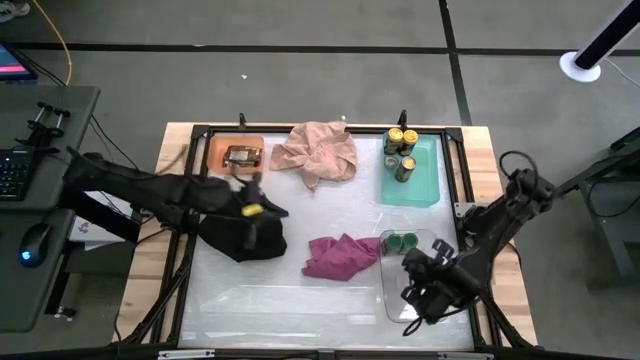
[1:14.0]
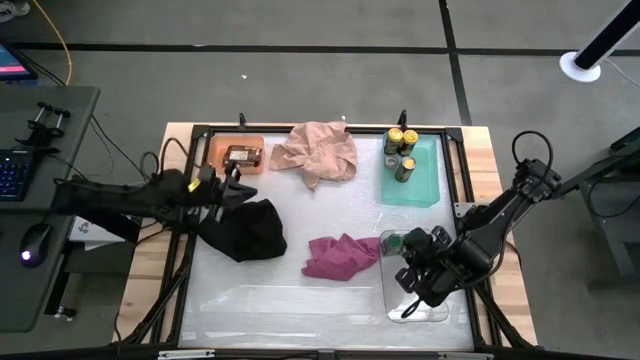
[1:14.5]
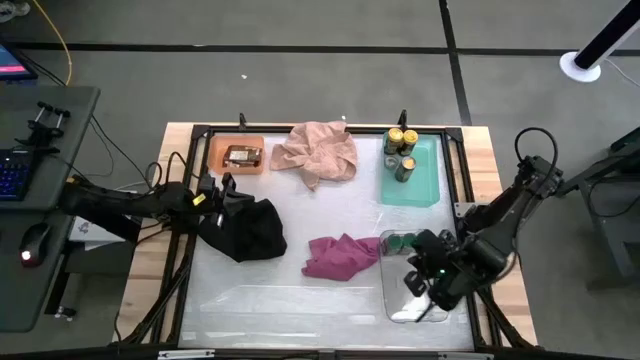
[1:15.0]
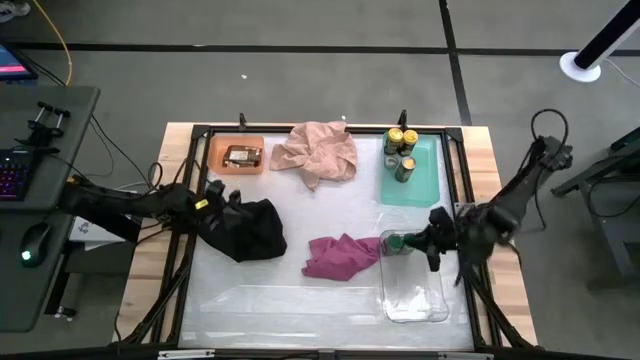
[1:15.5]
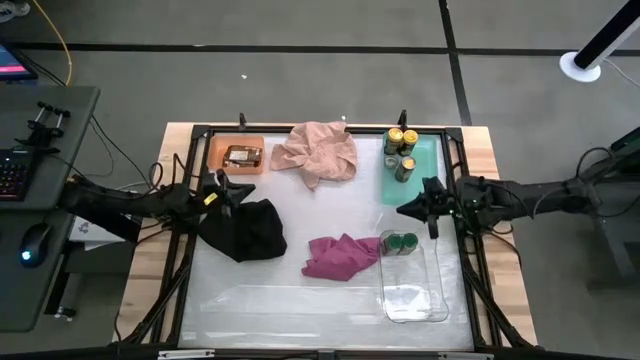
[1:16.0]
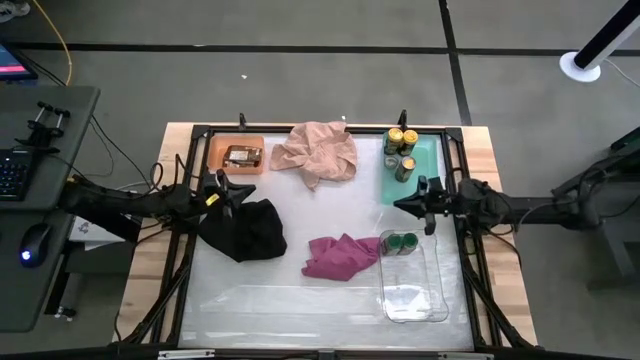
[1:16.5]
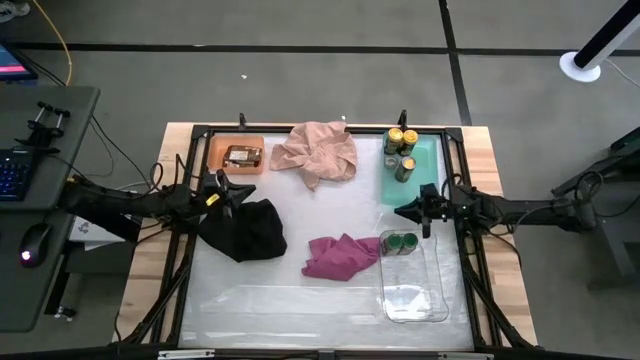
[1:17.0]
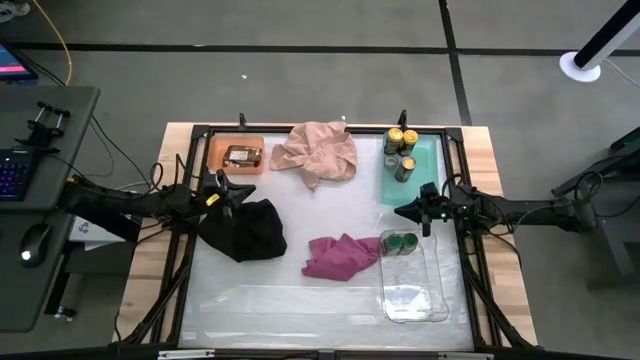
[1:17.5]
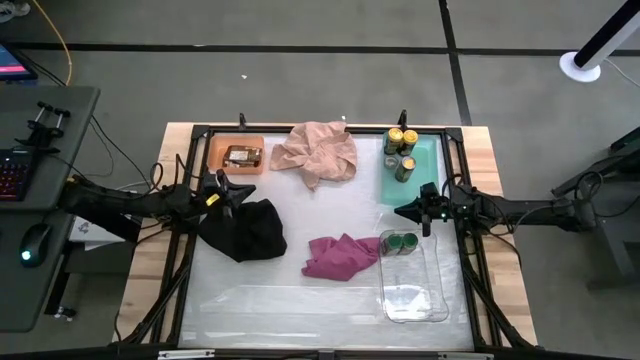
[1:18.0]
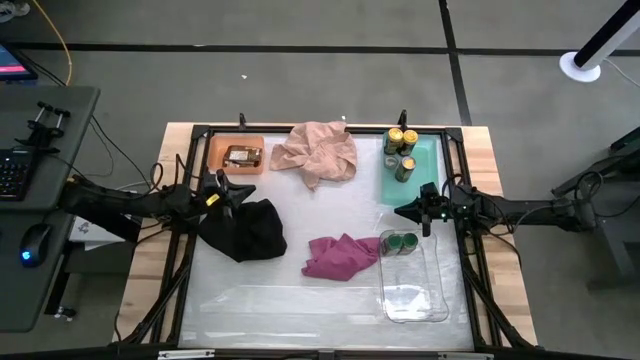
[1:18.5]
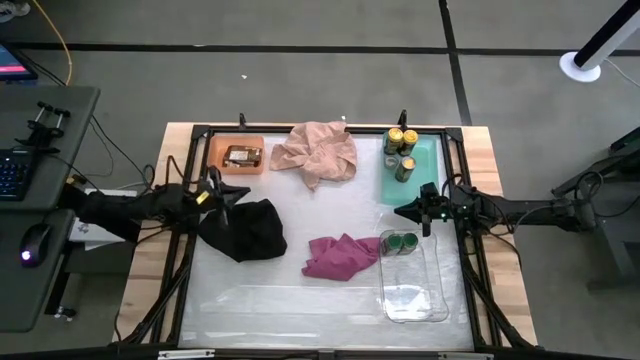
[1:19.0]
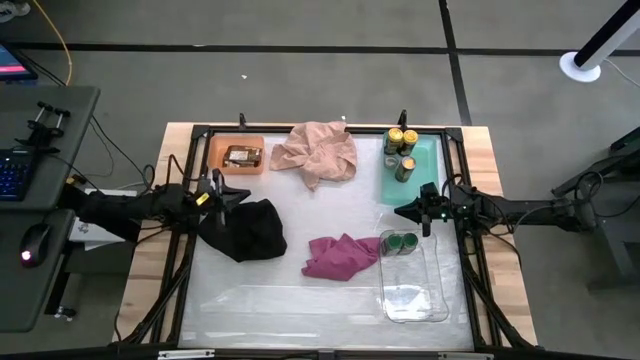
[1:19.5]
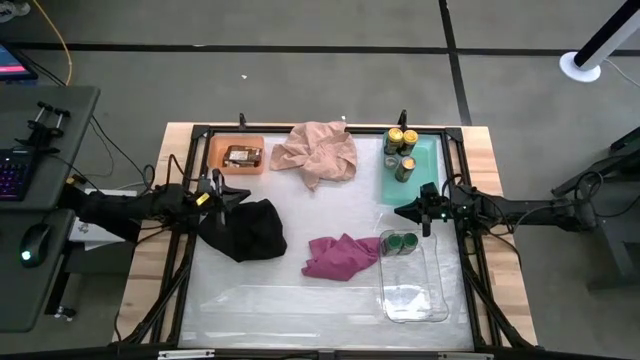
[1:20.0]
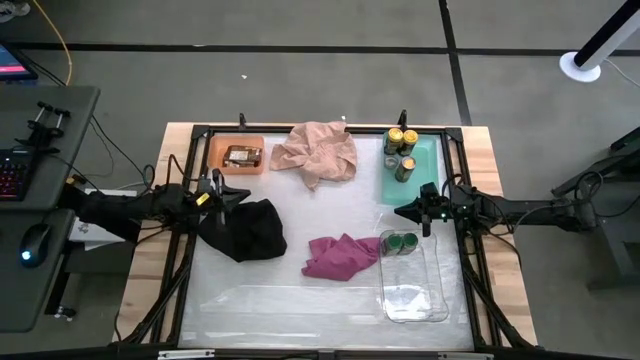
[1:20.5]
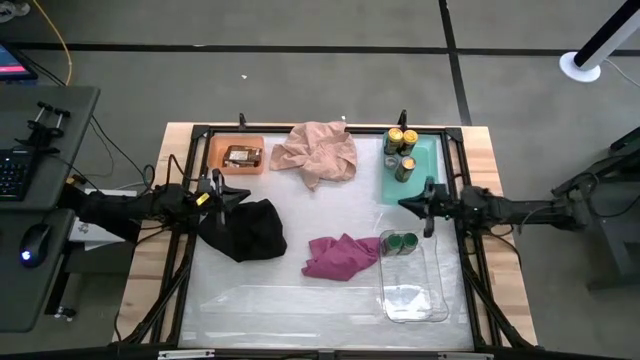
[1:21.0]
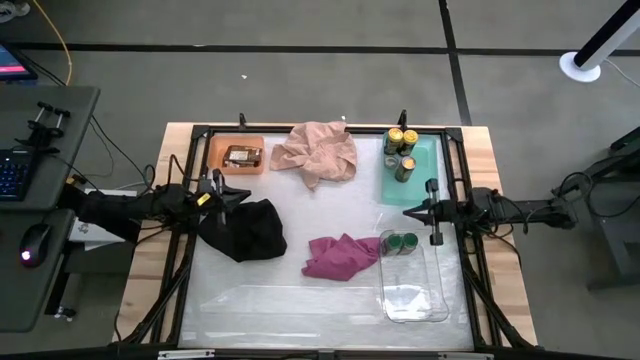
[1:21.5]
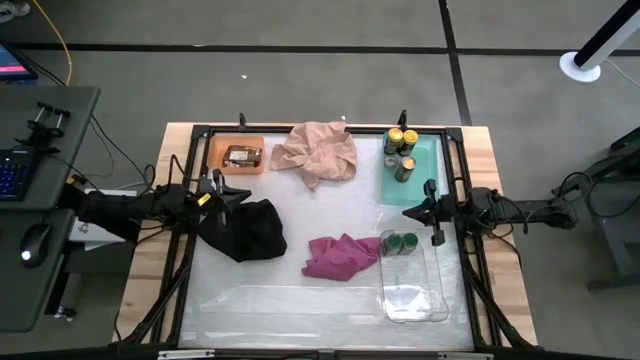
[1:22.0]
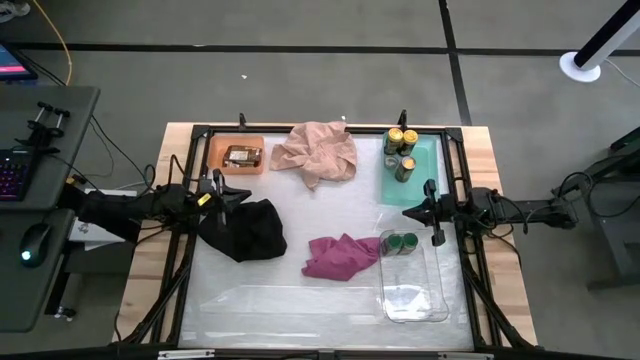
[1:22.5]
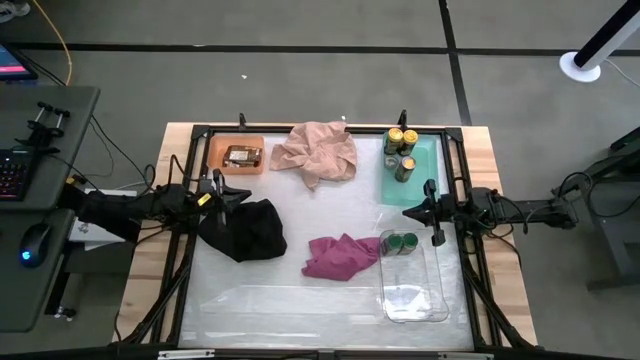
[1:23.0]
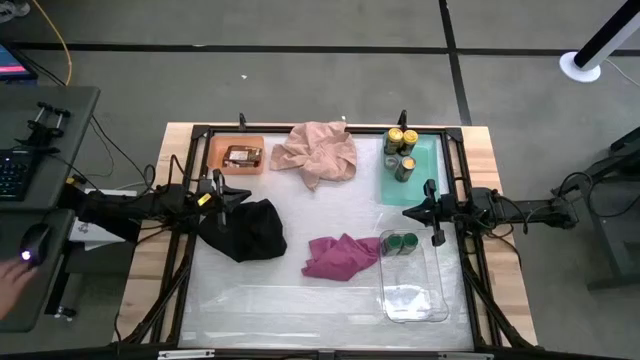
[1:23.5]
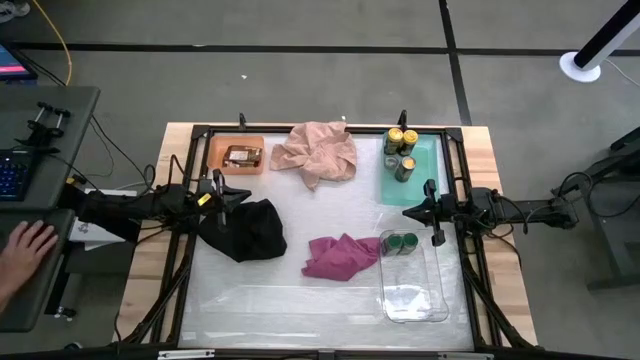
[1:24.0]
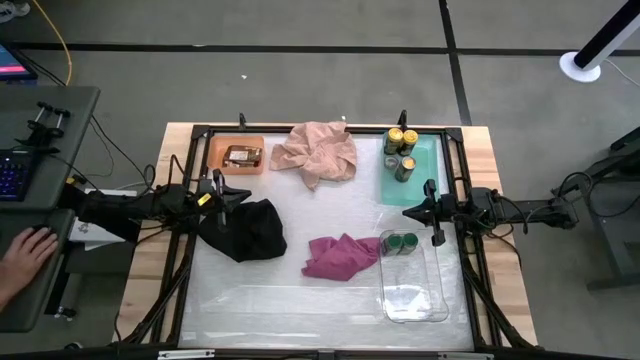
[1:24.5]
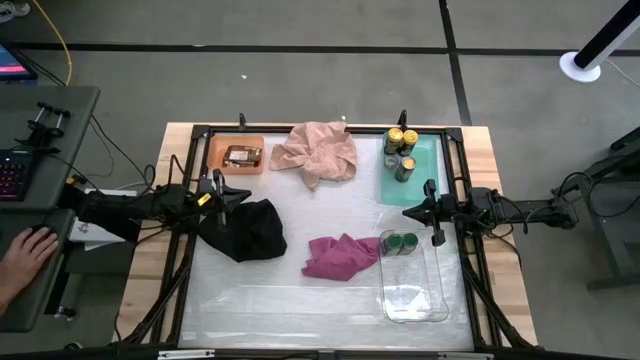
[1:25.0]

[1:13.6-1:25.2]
Task: Sort spices by type
Return to Home Position

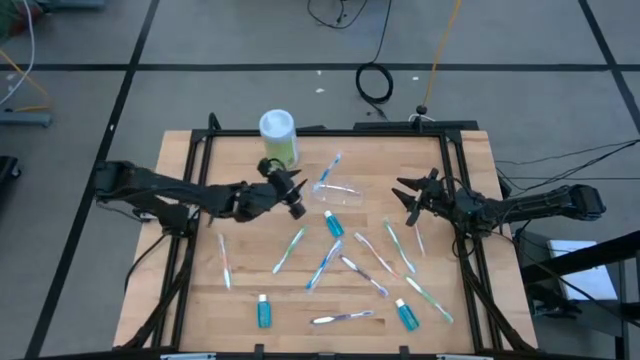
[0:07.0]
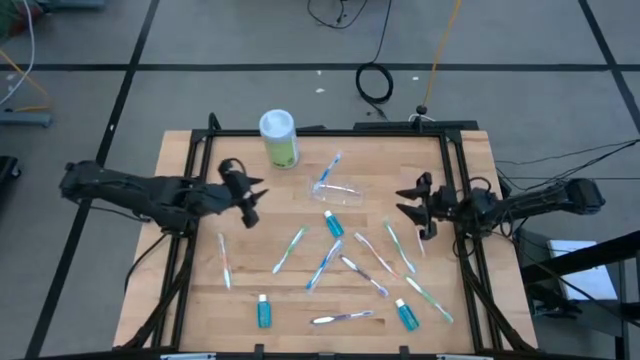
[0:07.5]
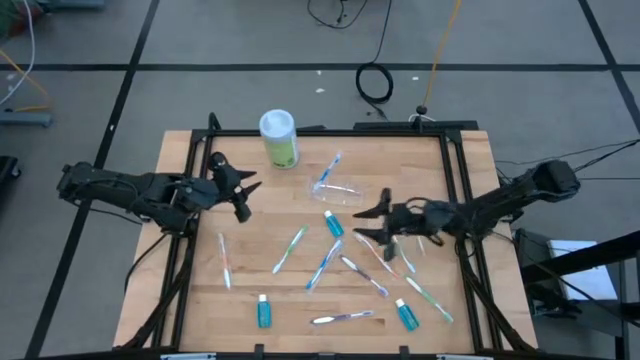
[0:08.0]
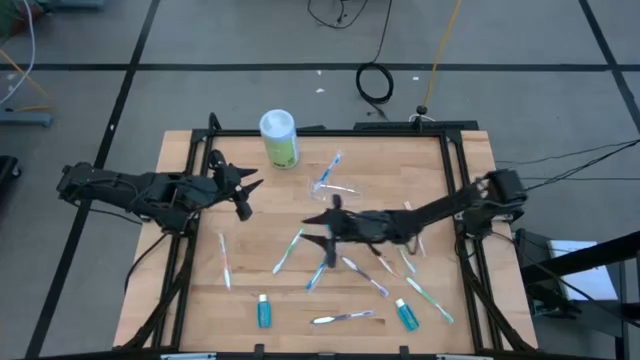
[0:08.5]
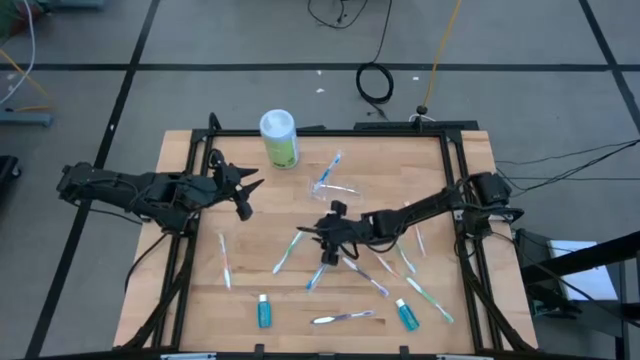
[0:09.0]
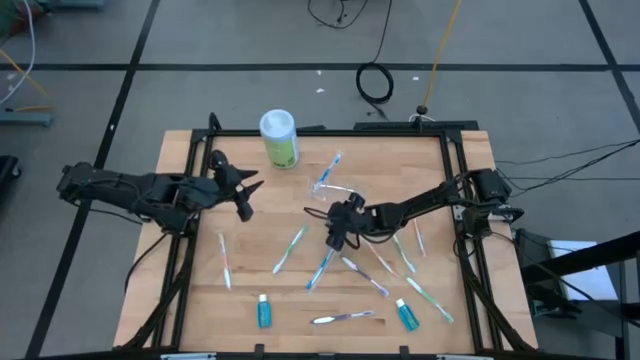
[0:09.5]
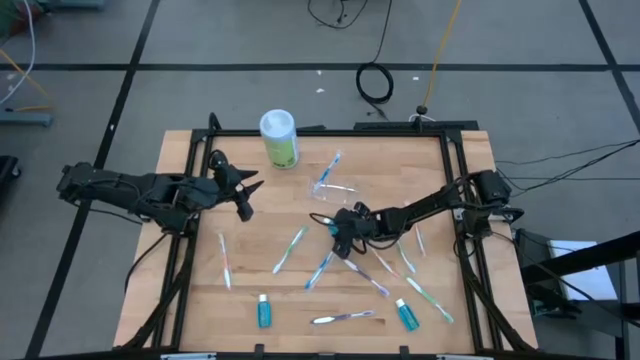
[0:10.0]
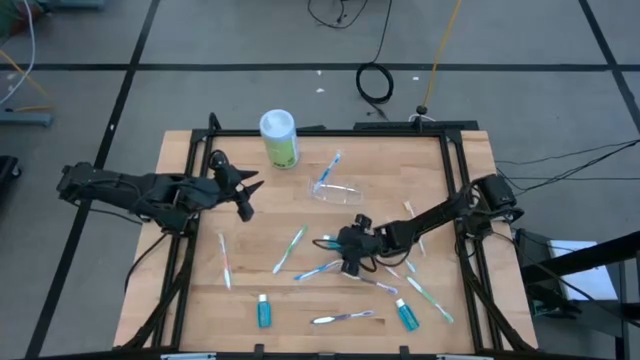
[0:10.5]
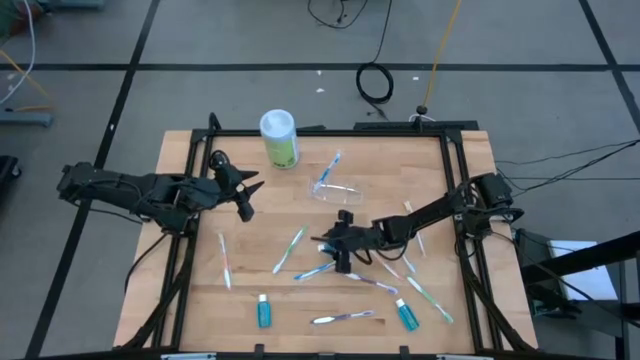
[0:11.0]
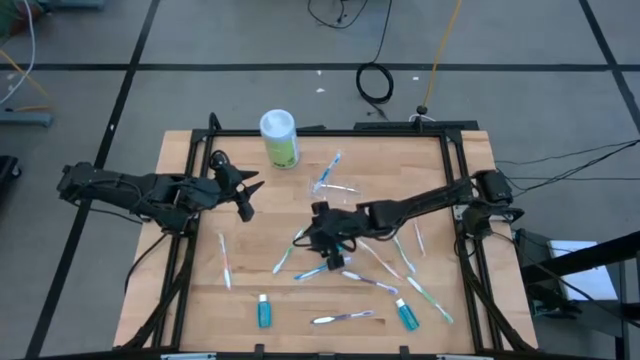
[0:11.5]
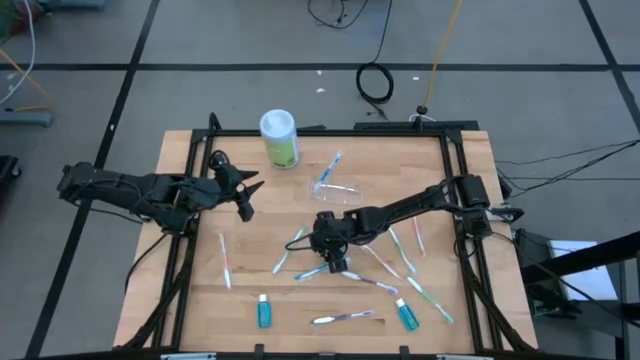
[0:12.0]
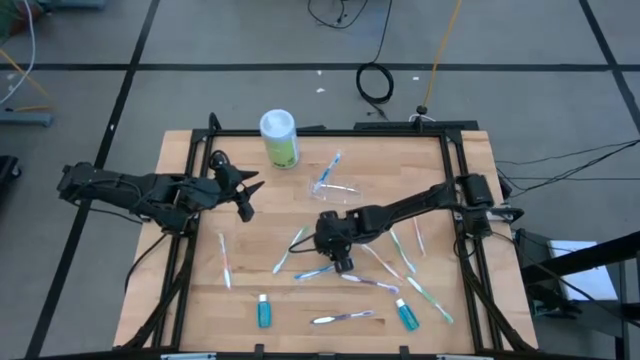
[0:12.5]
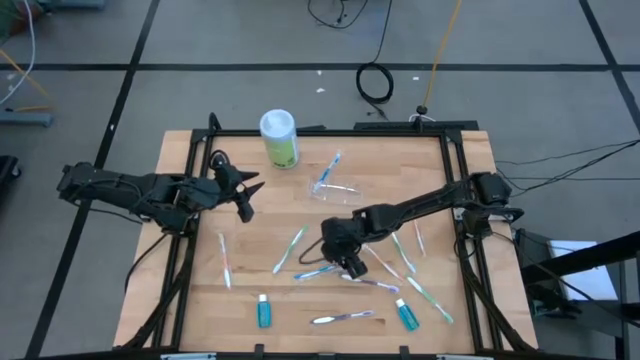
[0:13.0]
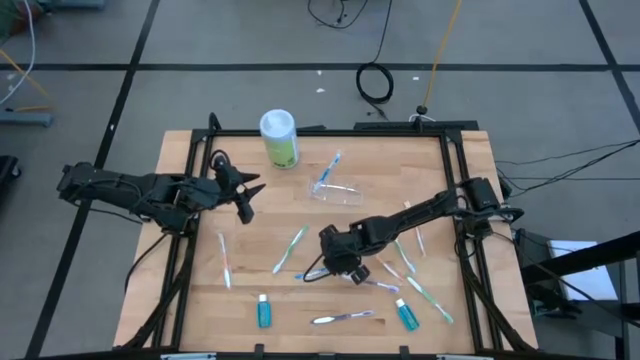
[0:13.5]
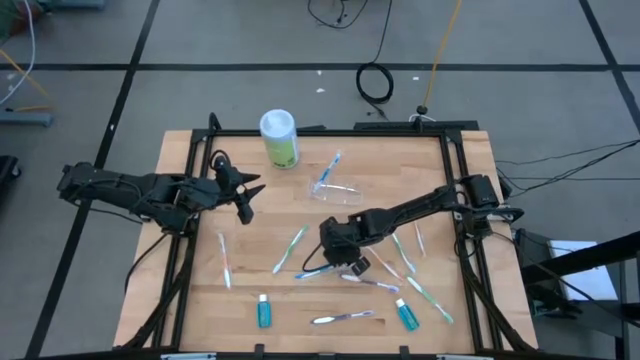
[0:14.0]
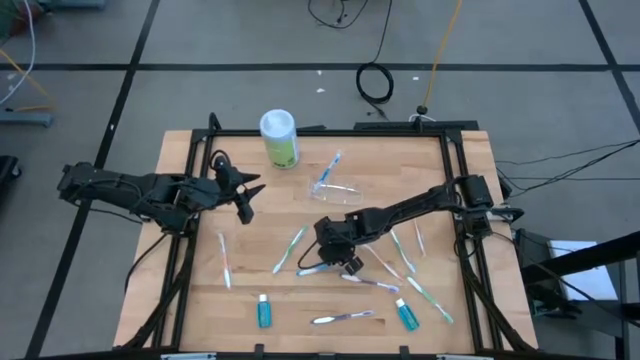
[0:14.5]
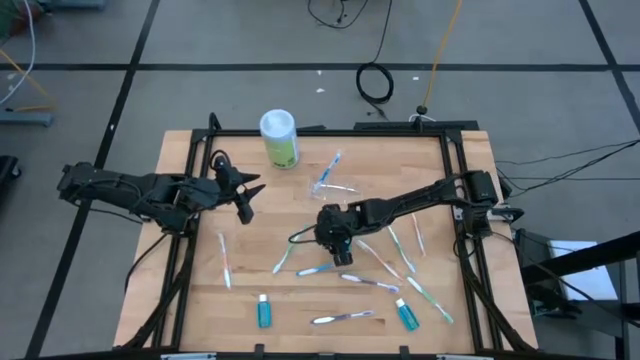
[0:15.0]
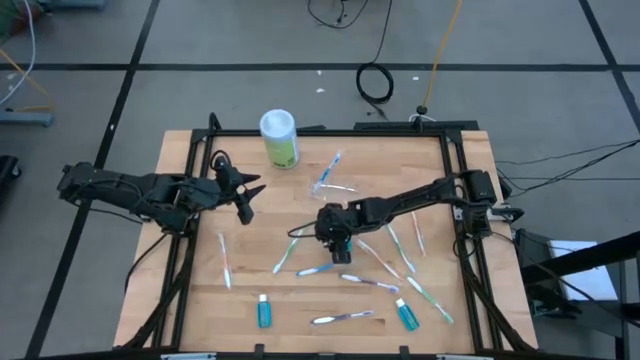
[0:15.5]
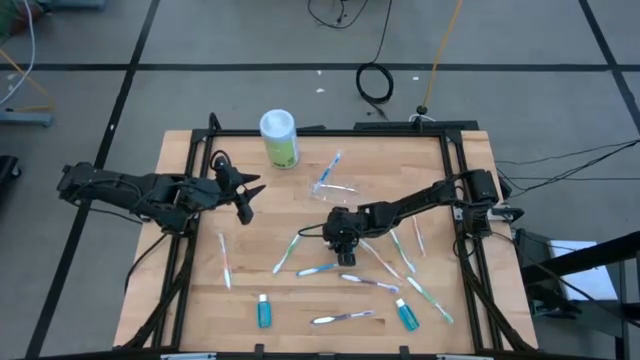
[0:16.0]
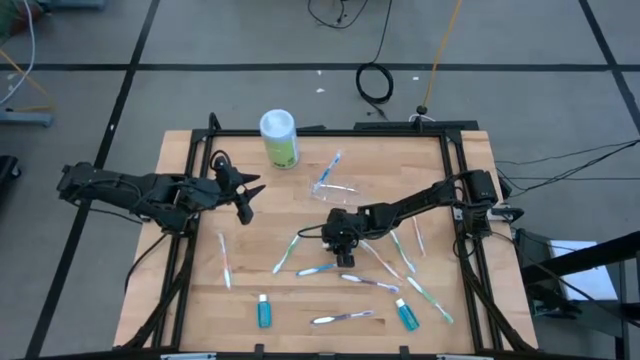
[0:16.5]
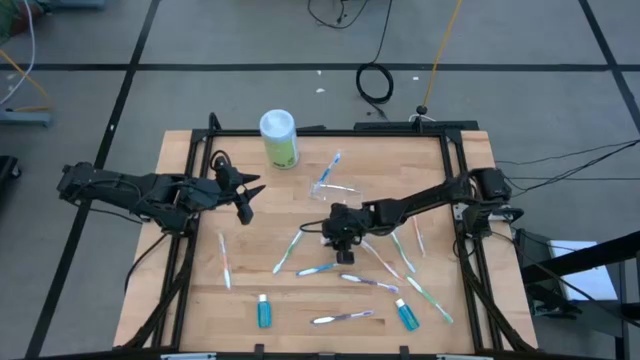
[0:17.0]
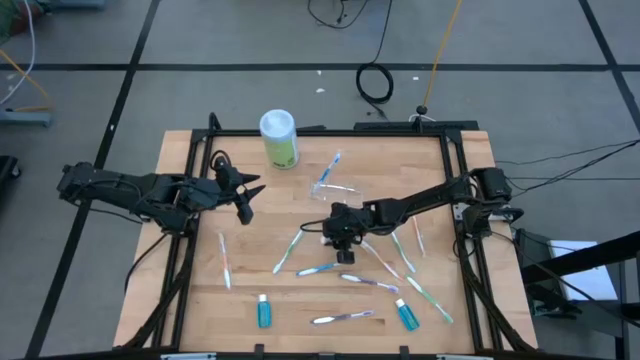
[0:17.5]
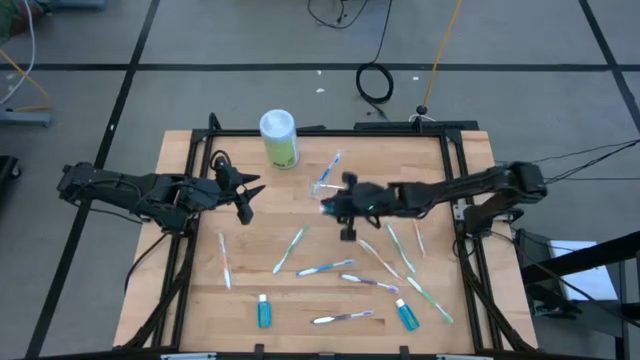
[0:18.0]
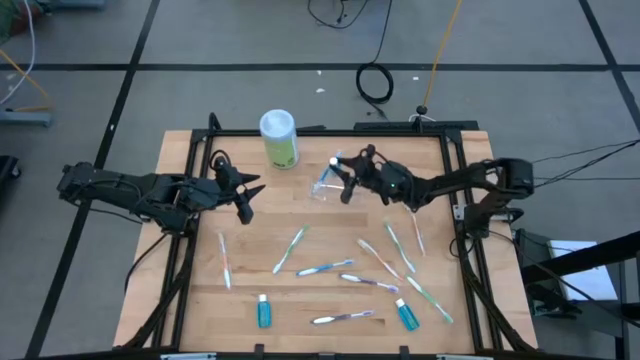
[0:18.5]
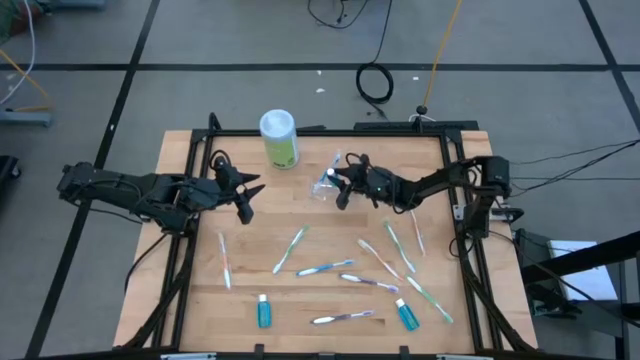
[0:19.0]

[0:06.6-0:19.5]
Task: Pick & Place toothbrushing station
Put the top blue mouthwash into the transparent organizer
